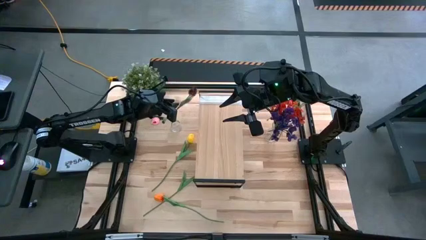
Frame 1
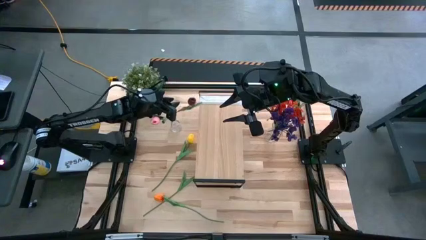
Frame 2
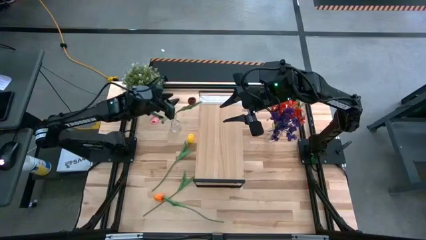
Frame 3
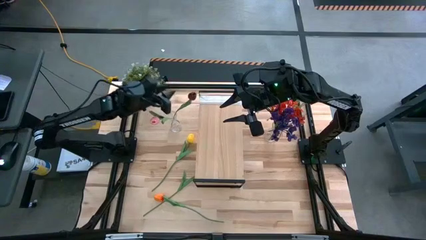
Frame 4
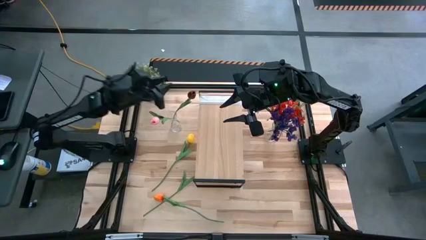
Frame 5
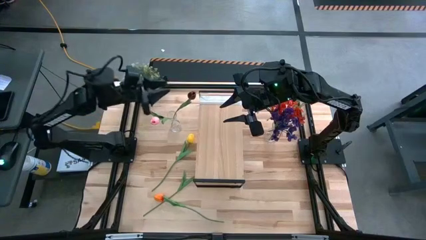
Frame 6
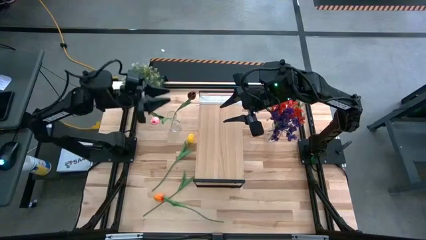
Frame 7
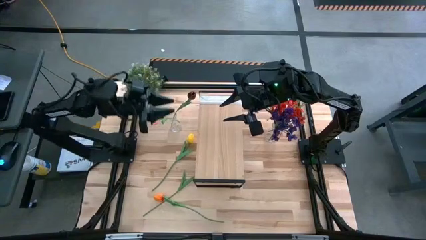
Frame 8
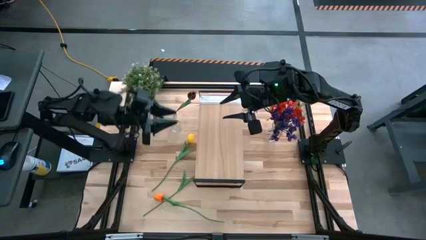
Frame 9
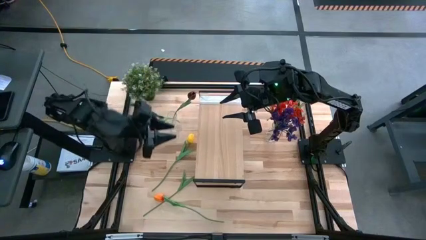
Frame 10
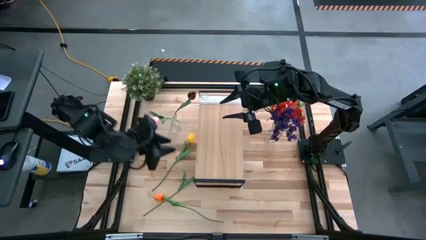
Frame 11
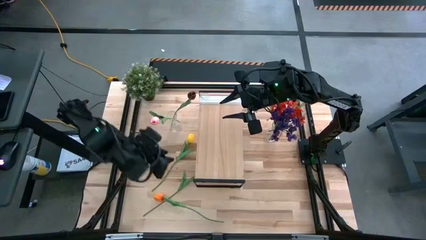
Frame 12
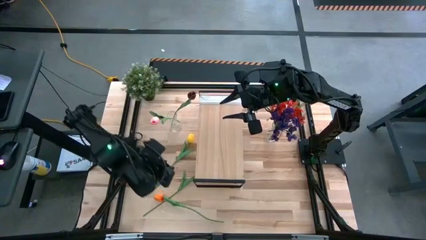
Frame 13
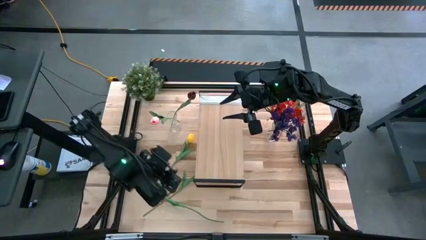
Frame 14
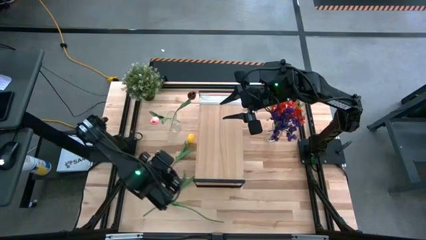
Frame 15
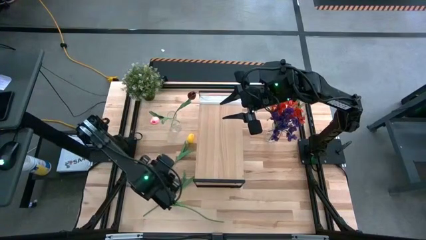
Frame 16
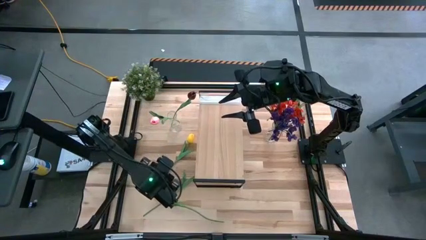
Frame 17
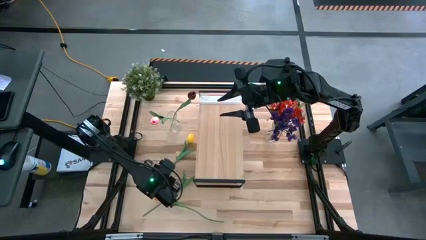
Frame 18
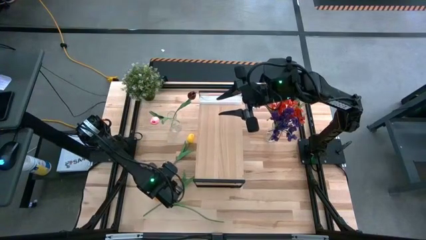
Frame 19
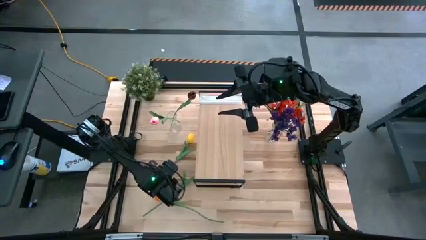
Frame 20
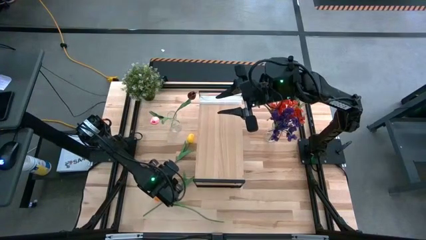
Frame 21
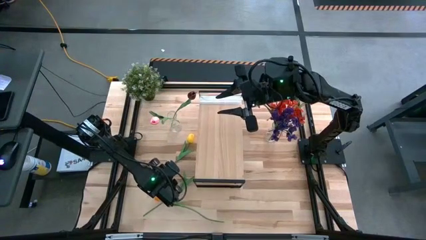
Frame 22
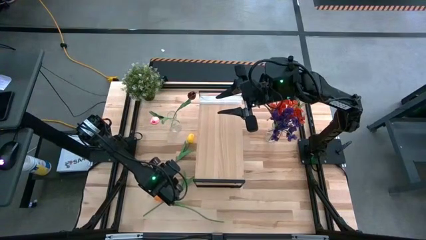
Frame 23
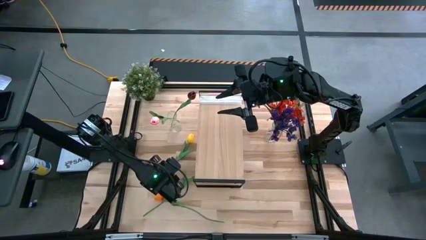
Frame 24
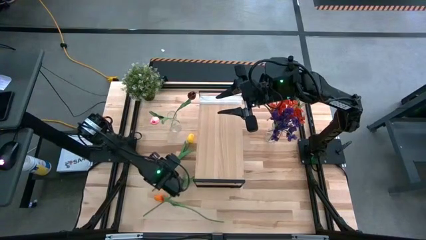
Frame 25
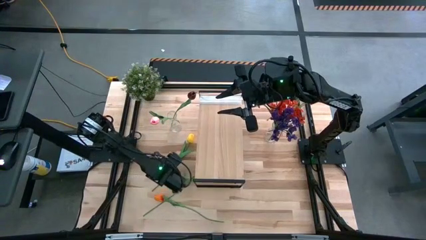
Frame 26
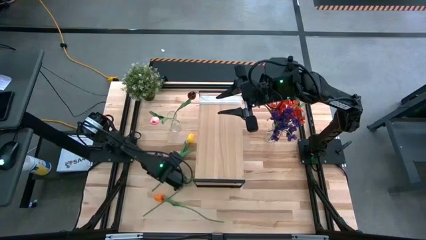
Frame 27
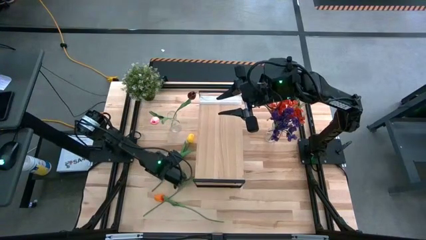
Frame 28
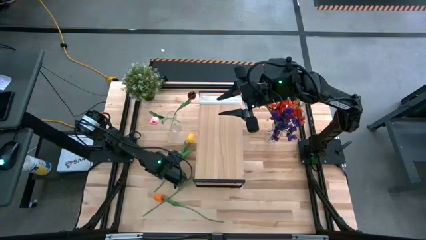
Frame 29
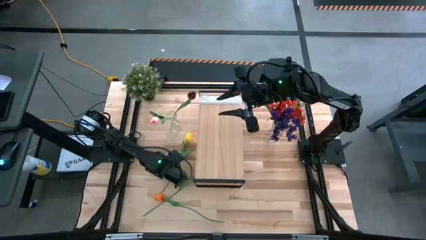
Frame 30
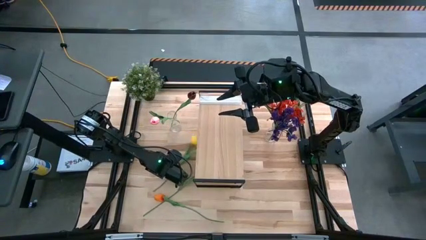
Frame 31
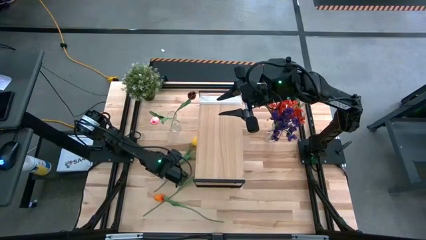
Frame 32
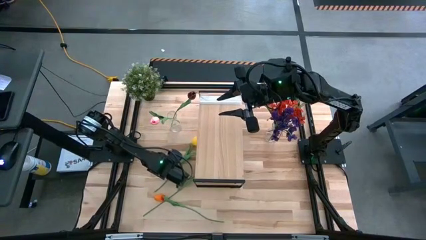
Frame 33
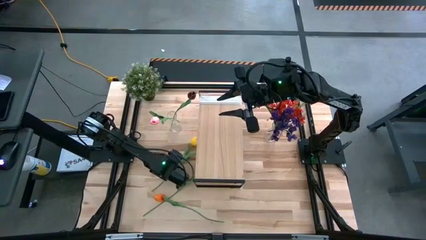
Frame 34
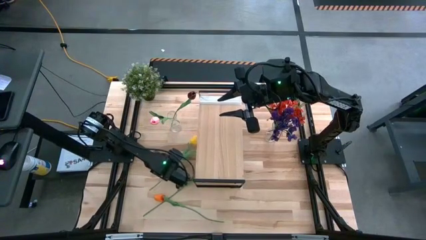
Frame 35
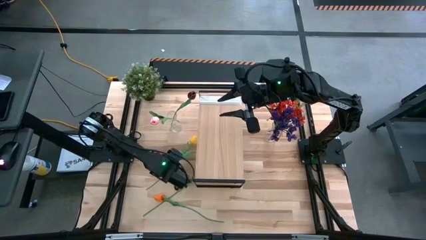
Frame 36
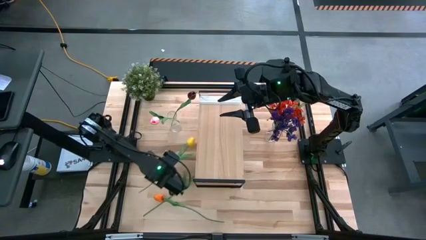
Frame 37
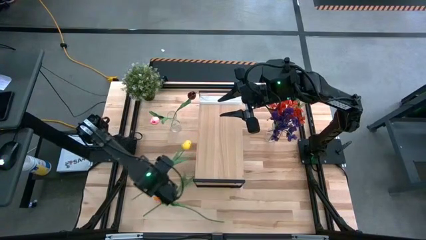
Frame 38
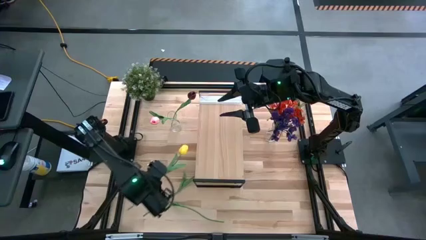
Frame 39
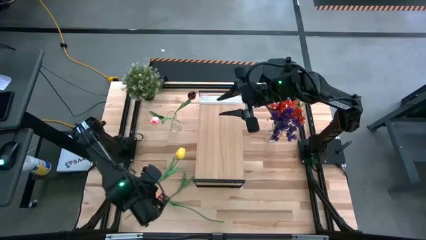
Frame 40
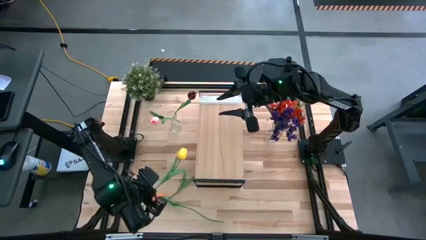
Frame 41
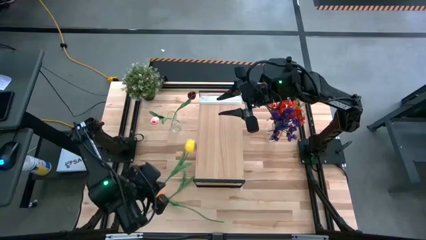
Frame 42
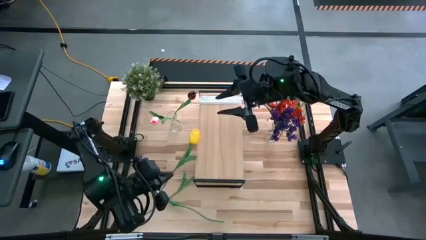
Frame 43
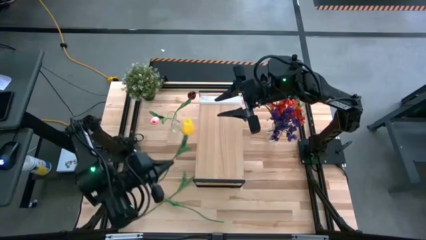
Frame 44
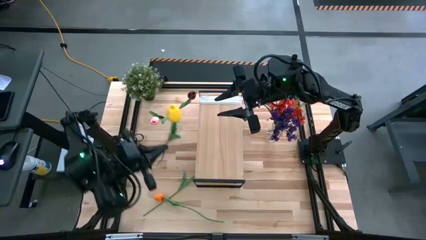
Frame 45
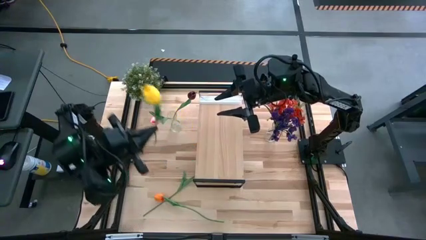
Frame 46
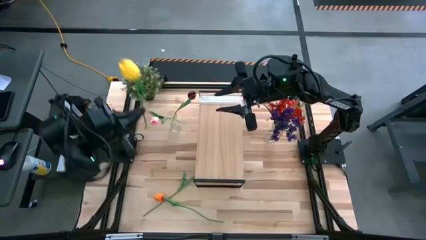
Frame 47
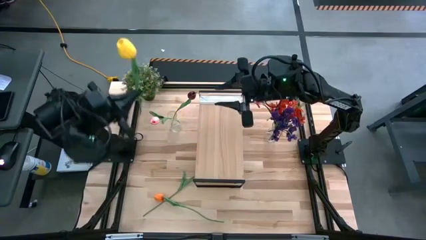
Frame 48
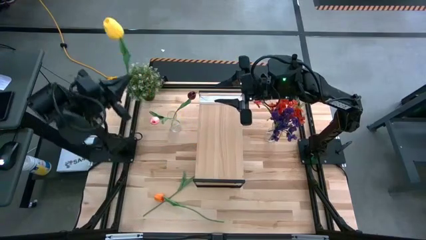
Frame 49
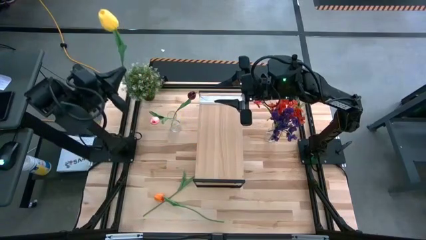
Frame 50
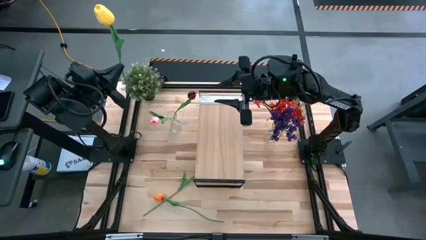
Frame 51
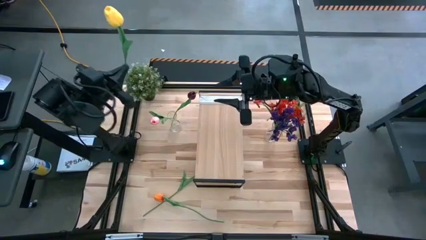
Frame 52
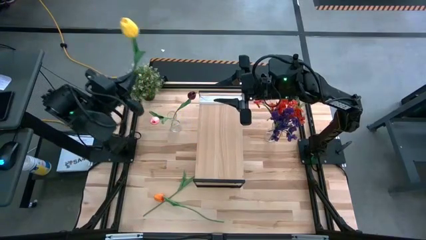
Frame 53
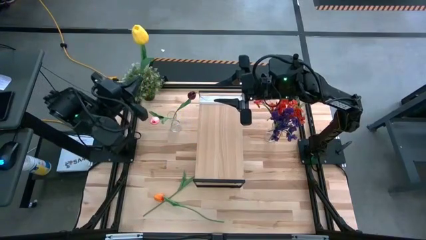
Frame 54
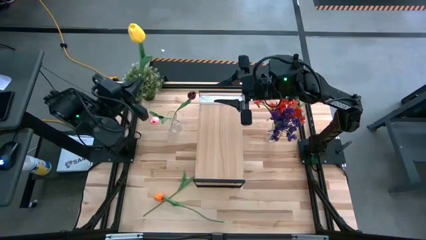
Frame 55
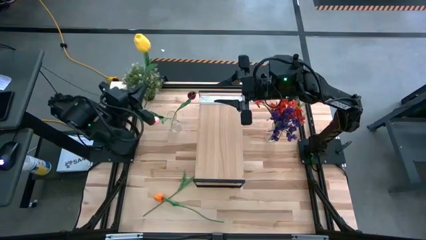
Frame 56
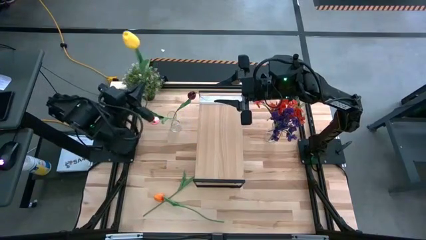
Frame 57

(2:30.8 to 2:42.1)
Task: Pick and place flowers into a vace then onto a shelf
Put the yellow tulip into the left transparent vase

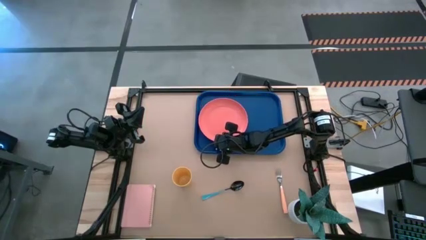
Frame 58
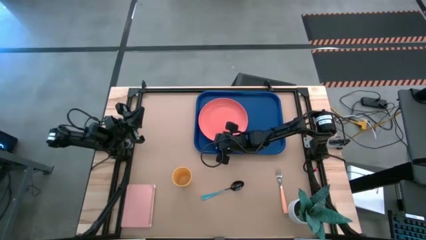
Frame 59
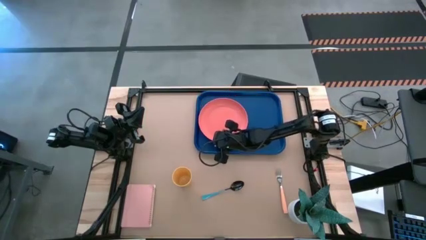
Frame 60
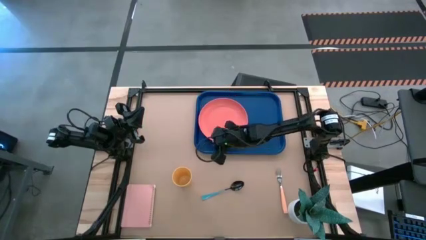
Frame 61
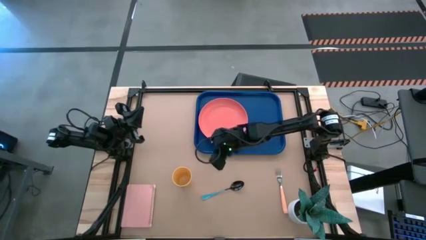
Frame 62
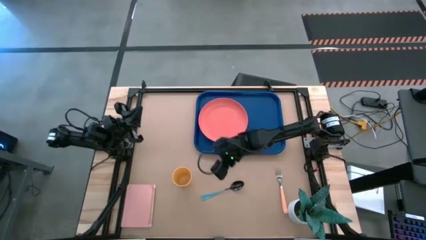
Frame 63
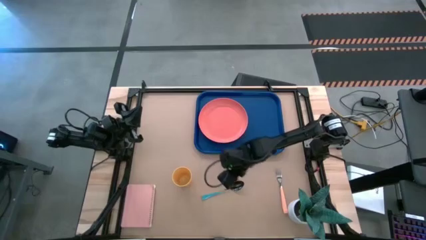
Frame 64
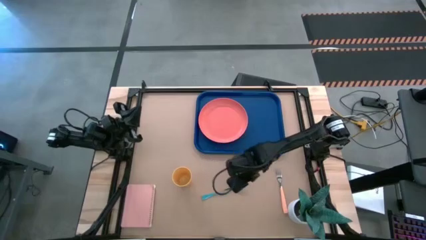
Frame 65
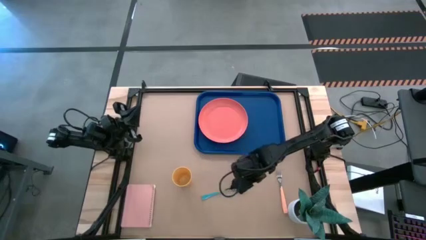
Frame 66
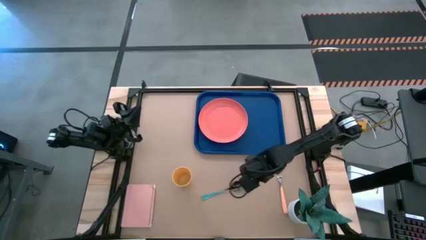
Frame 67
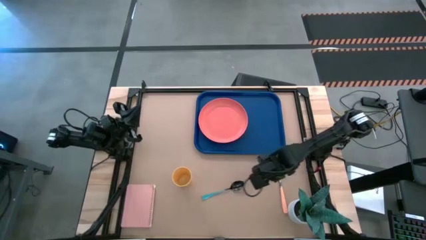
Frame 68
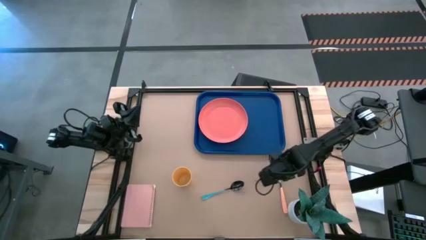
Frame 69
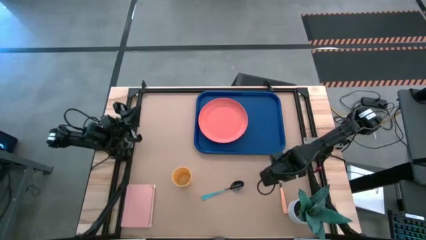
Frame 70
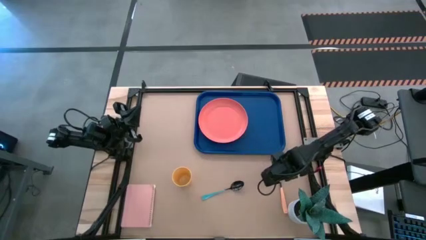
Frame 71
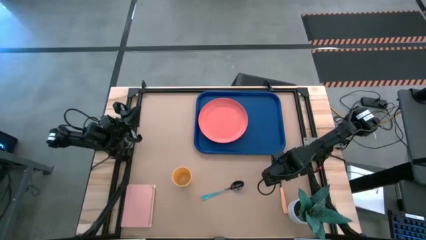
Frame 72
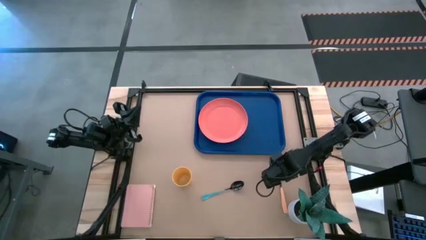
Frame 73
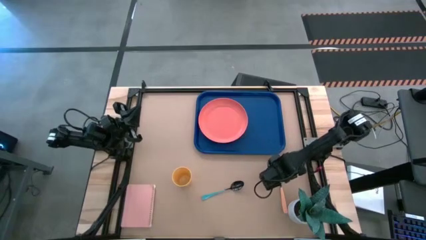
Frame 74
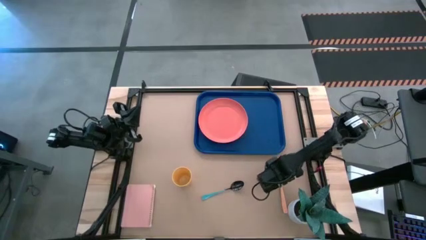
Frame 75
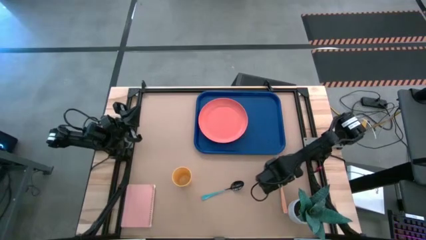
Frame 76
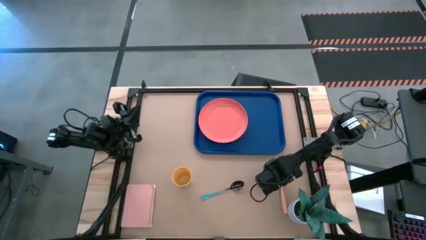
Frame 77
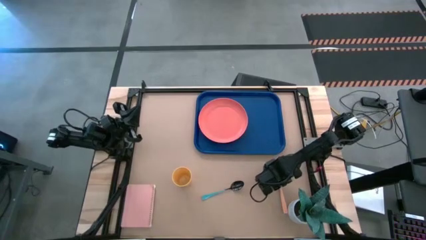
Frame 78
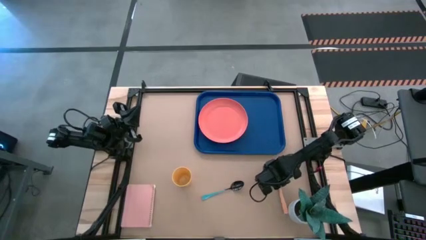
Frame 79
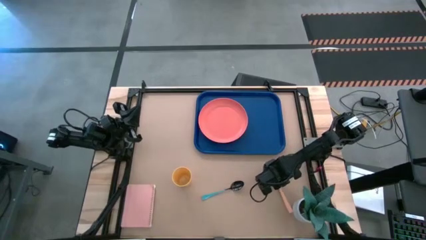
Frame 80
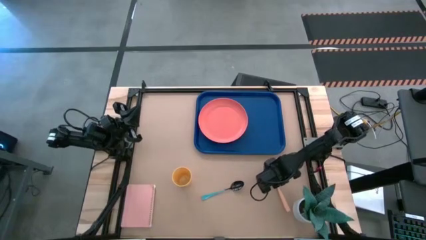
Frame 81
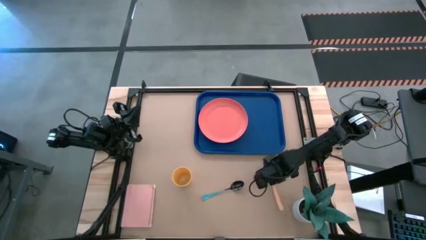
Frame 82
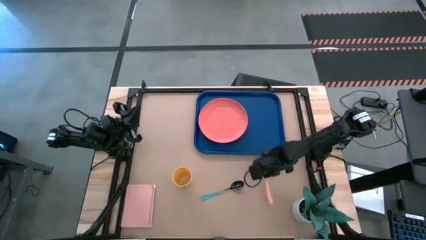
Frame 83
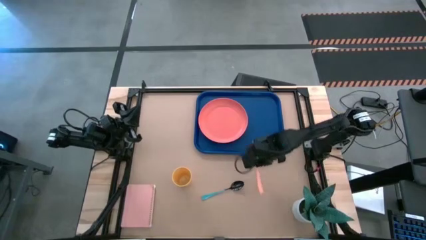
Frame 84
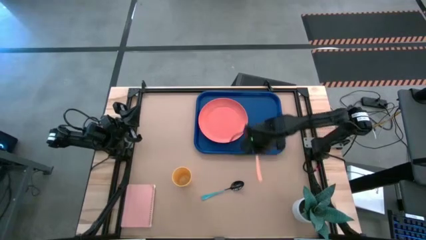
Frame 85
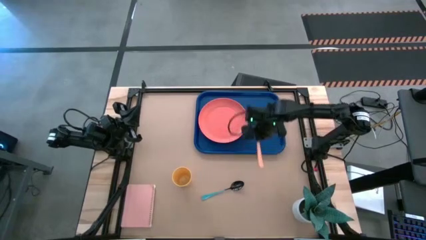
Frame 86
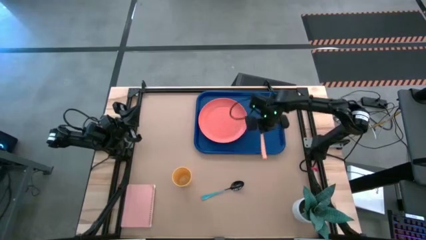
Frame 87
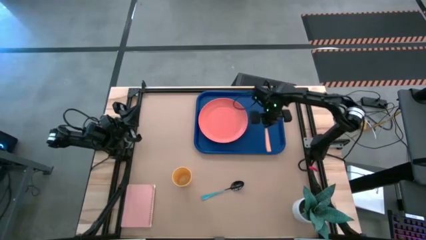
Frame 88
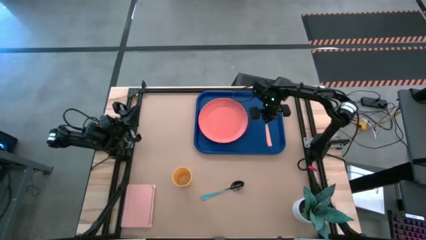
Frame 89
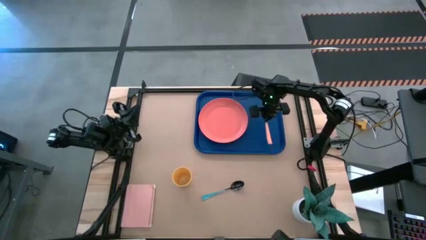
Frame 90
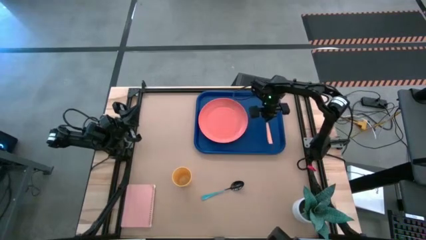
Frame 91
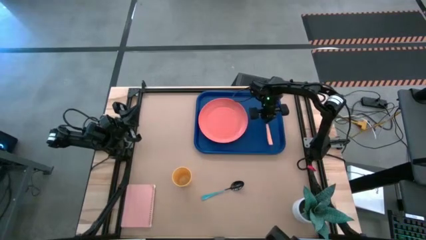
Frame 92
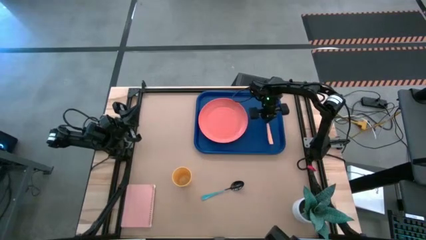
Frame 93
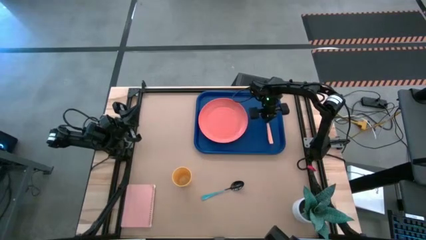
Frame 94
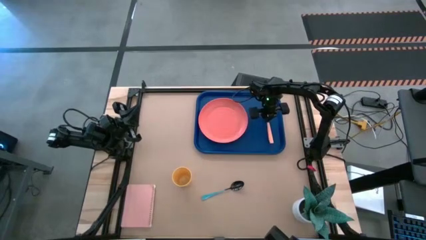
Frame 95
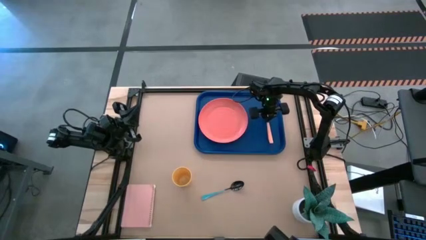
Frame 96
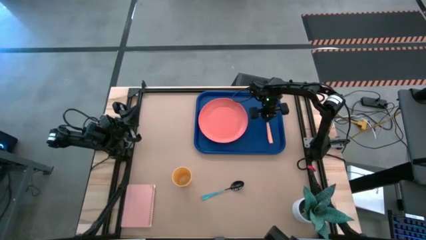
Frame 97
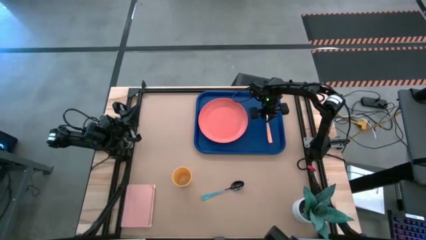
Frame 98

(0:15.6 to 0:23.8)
Task: Pick and place plate/cup/fork/spoon on tray
Put the light orange fork on the blue serving tray to the right of the orange plate
